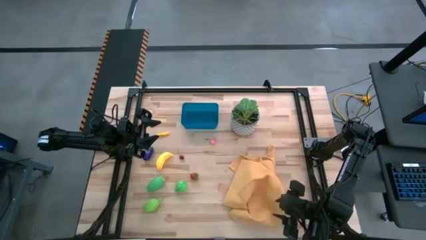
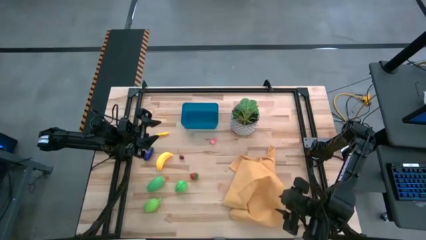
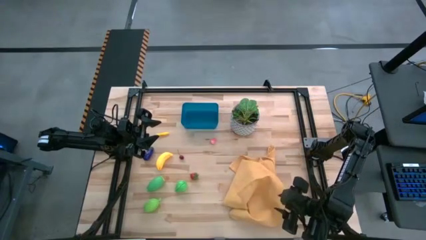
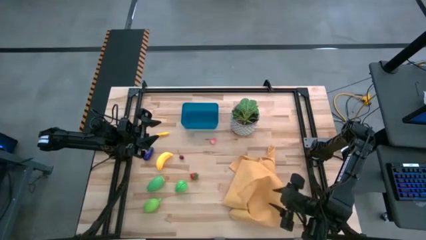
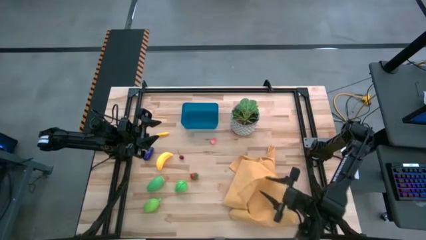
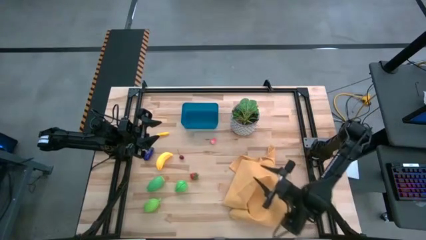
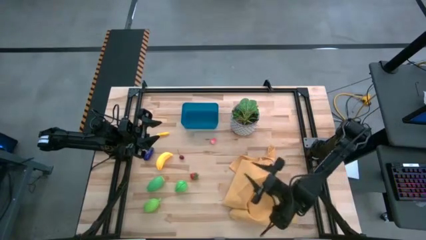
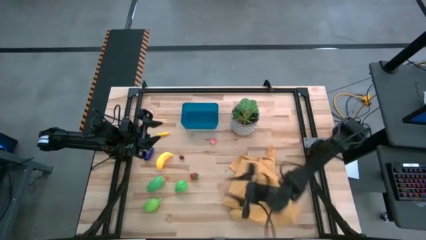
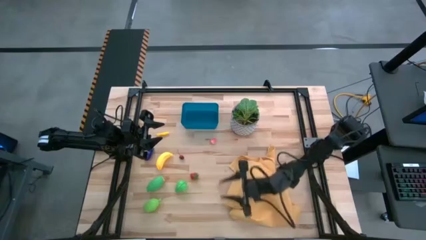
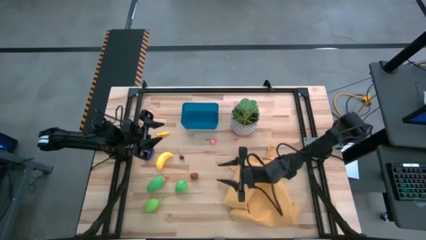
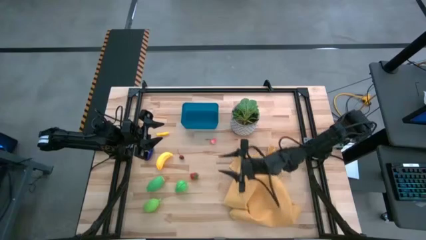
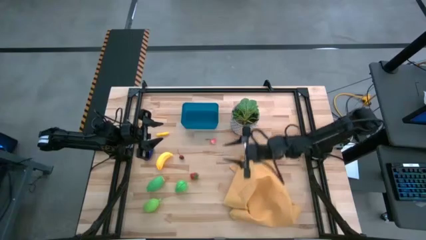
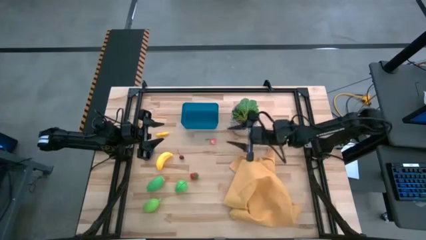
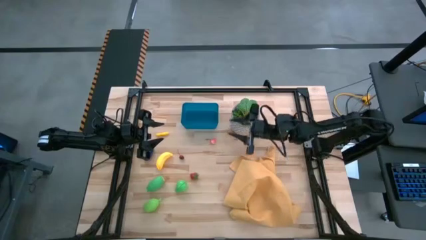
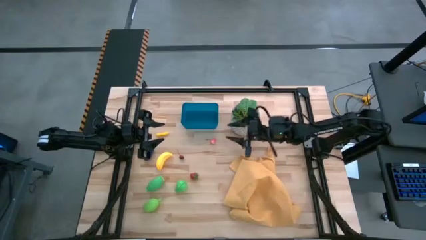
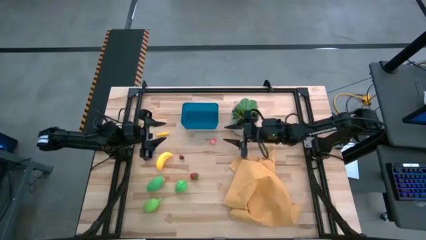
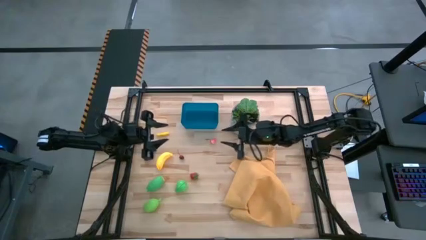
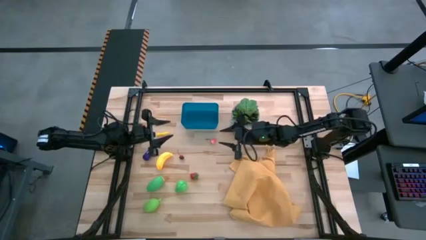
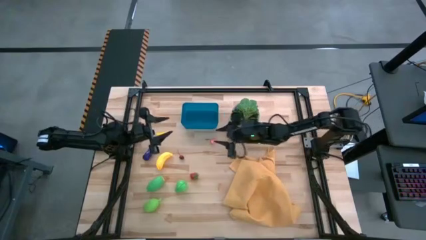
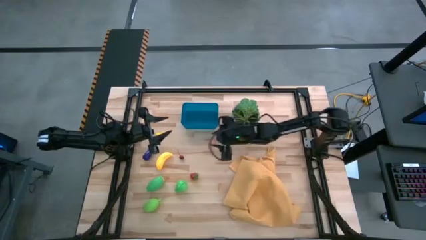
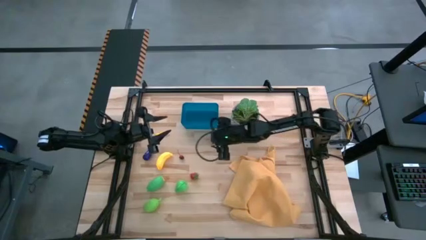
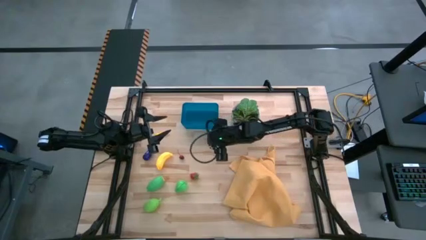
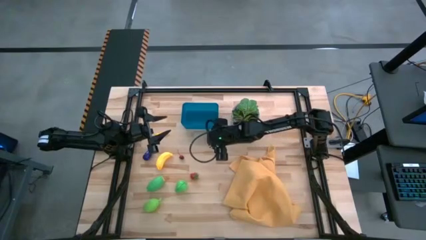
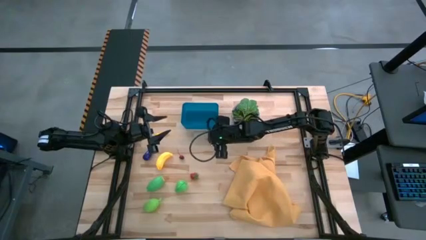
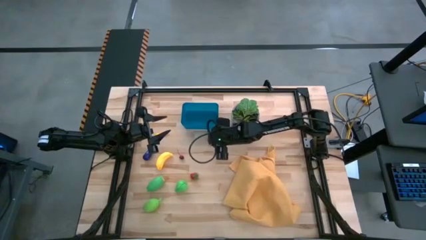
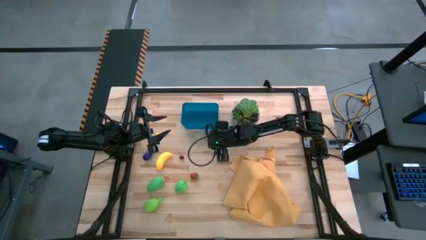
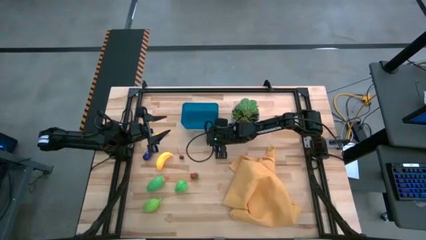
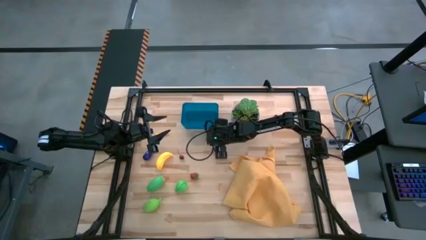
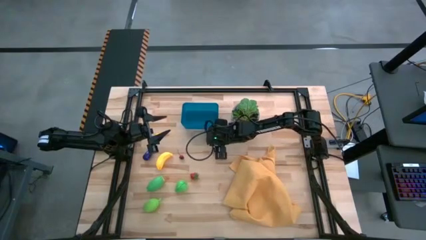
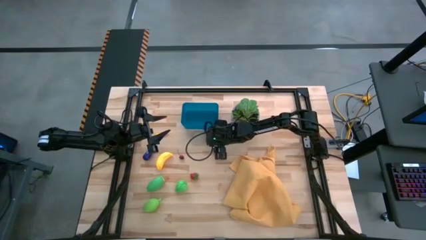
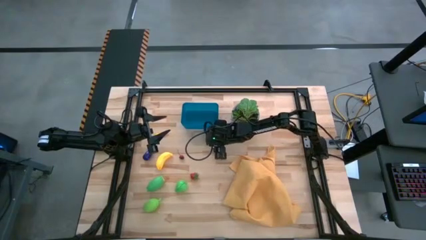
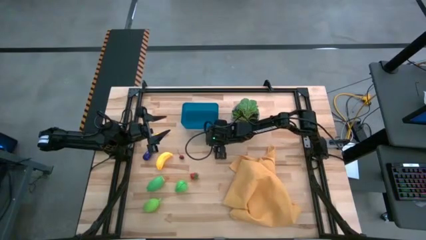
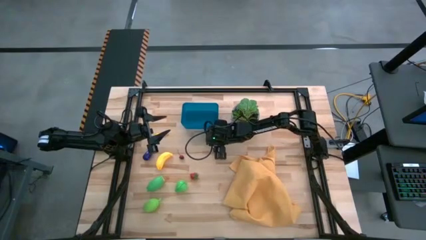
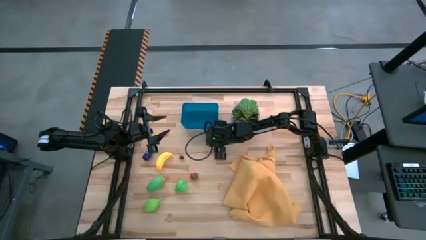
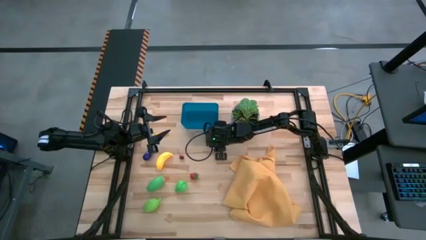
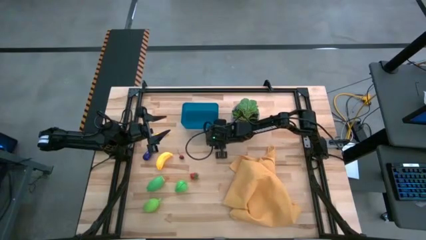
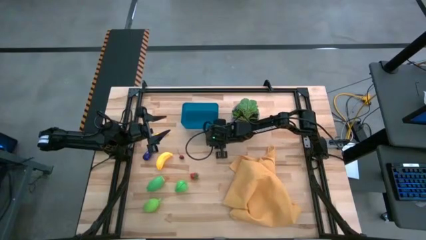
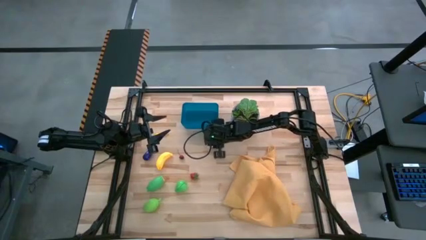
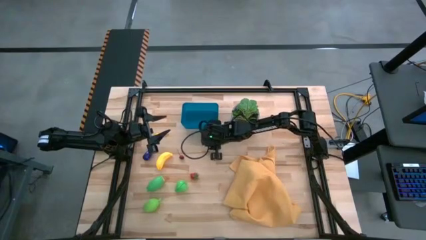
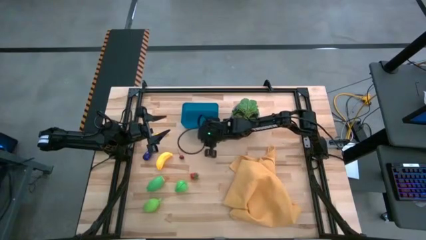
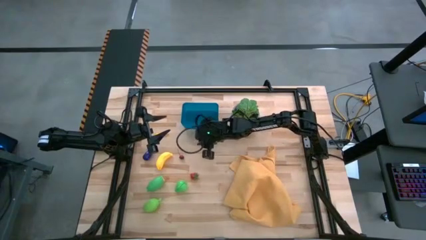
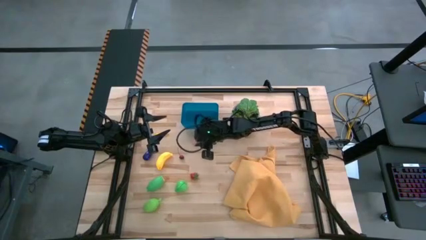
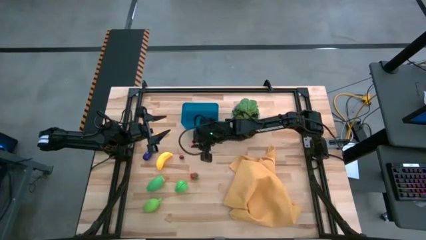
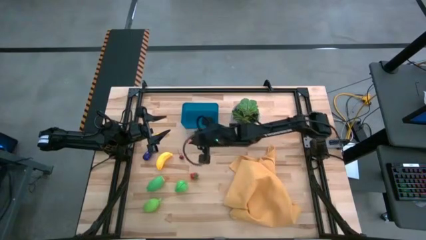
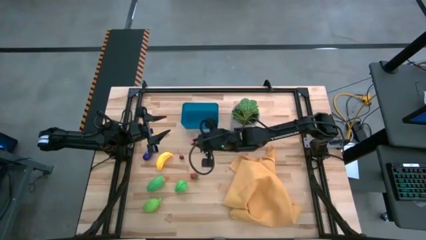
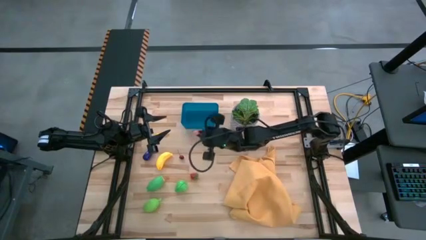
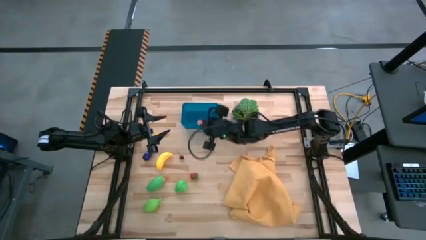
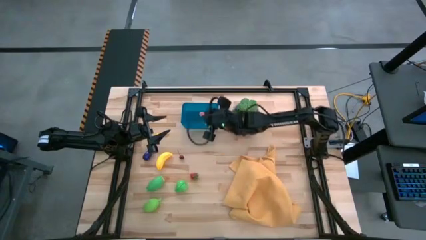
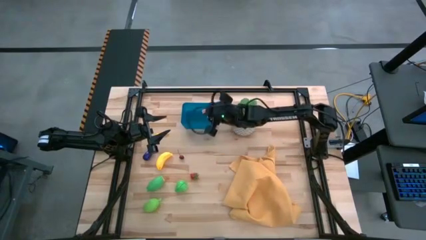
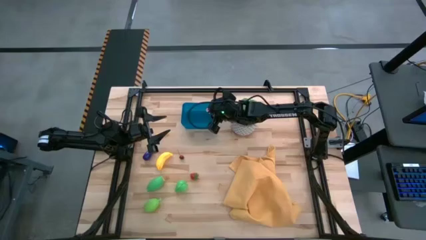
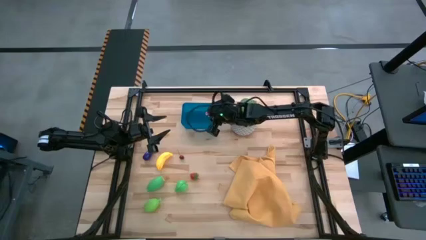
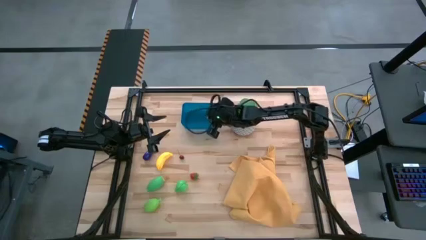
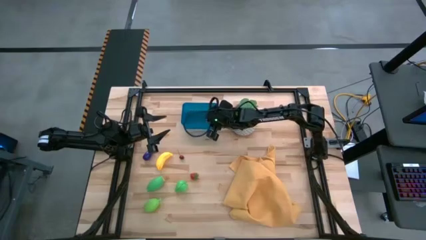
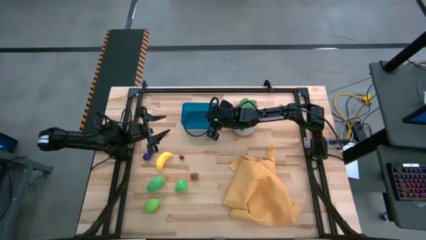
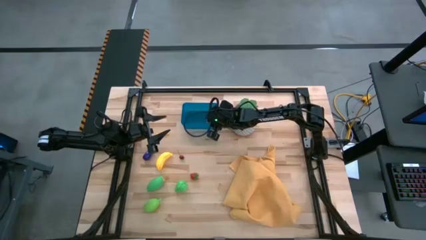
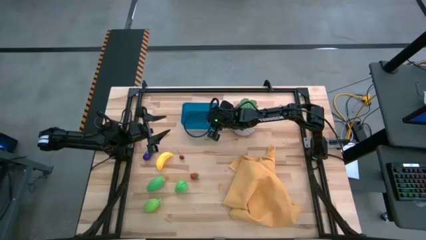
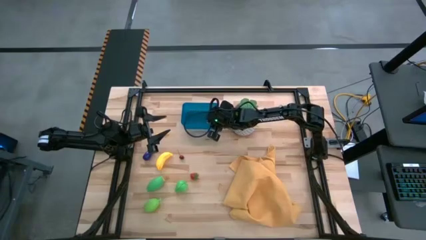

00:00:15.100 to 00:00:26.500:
Task: Pick and placing Produce into tupperware
Put the pink peach into the blue bin
